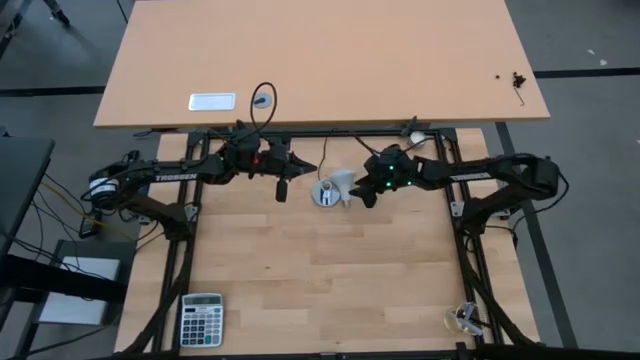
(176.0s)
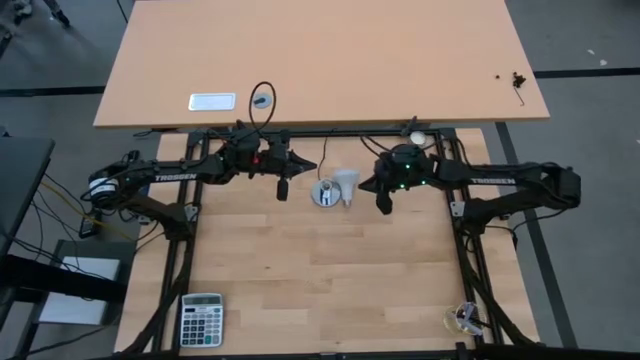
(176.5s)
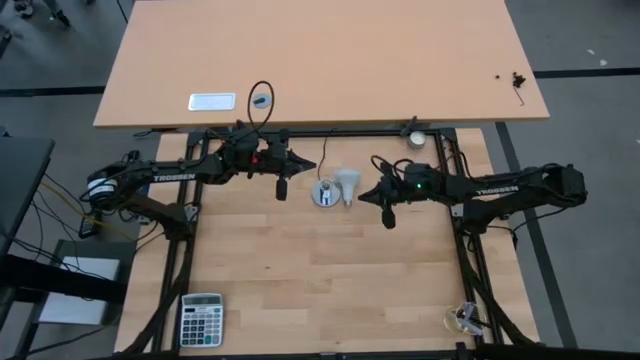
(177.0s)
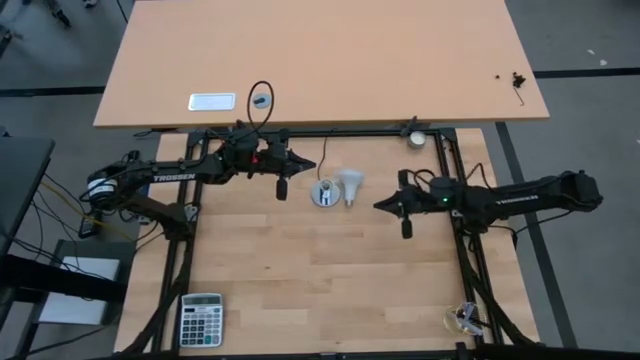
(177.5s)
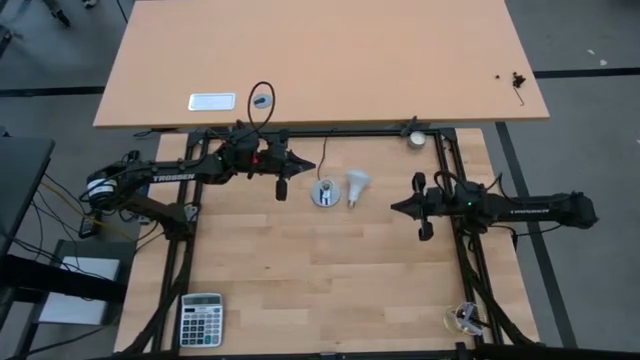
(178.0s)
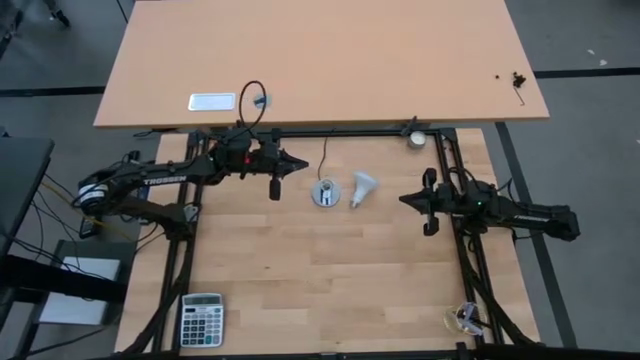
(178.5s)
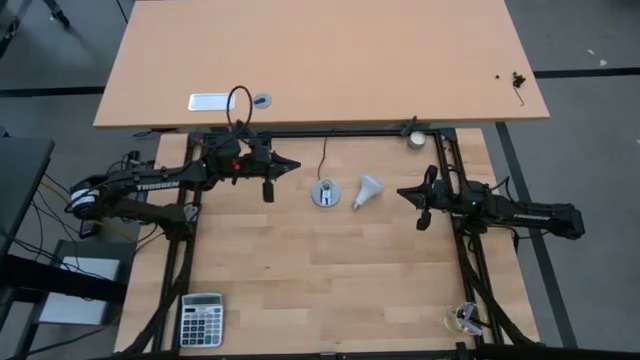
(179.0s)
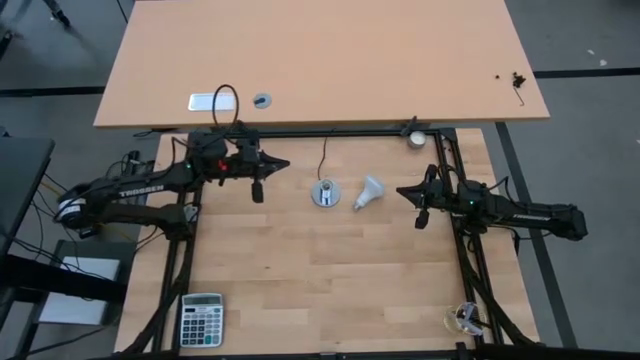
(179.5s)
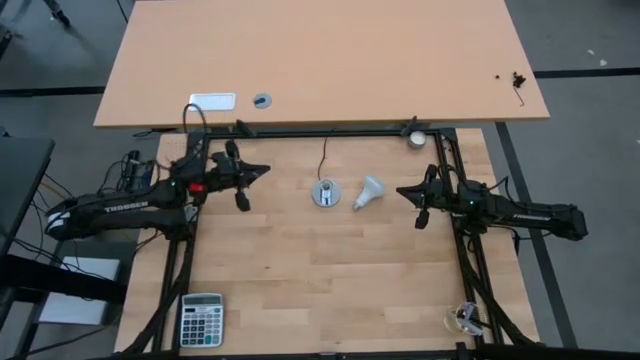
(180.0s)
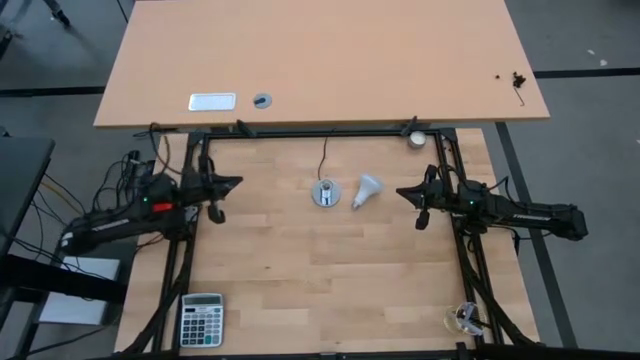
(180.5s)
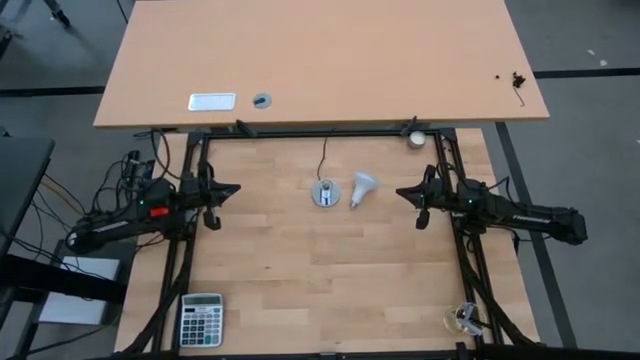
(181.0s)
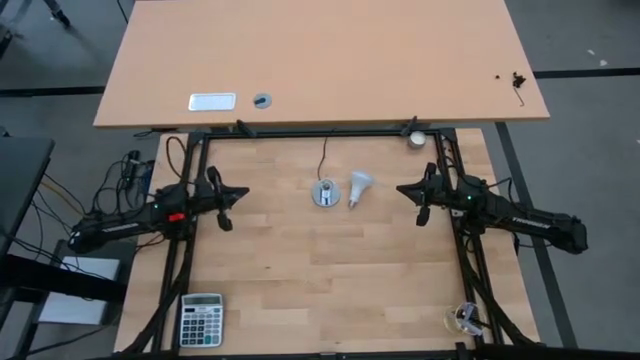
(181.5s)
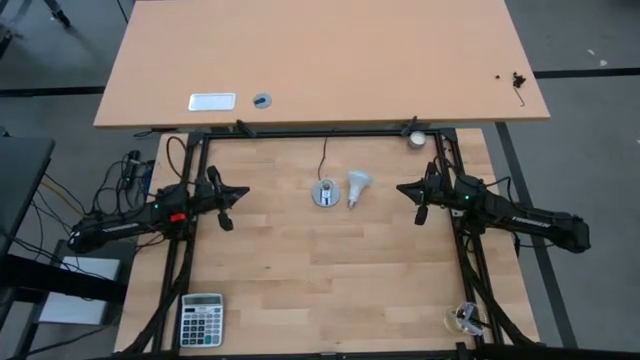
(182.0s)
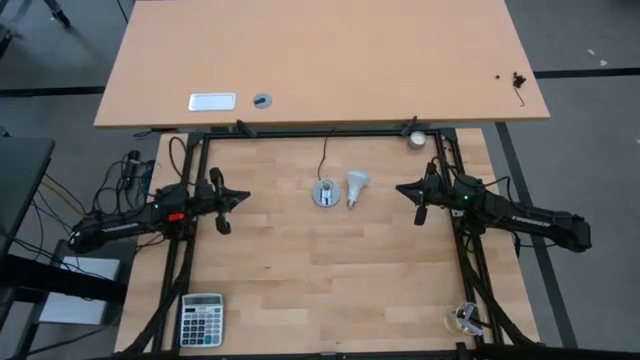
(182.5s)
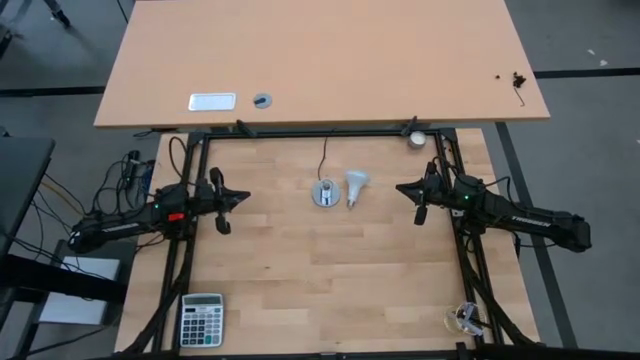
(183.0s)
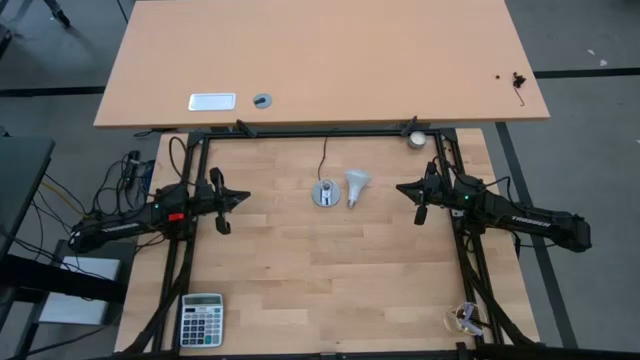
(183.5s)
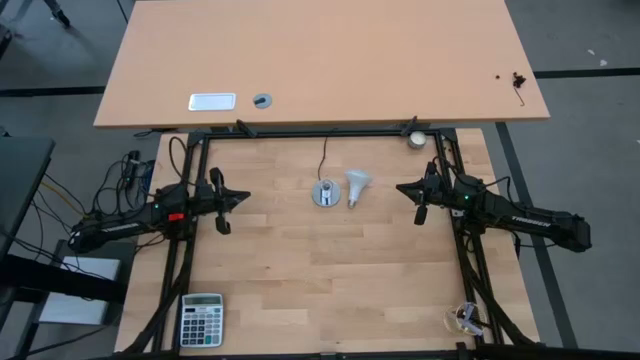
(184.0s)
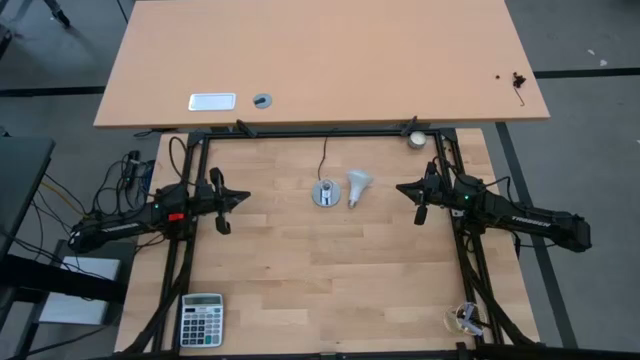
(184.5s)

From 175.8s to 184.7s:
Task: Screw lightbulb
Return to Home Position

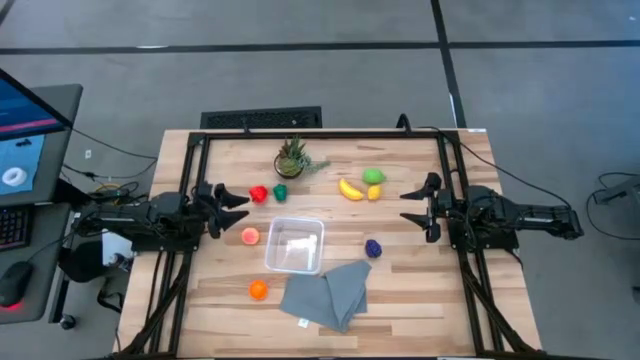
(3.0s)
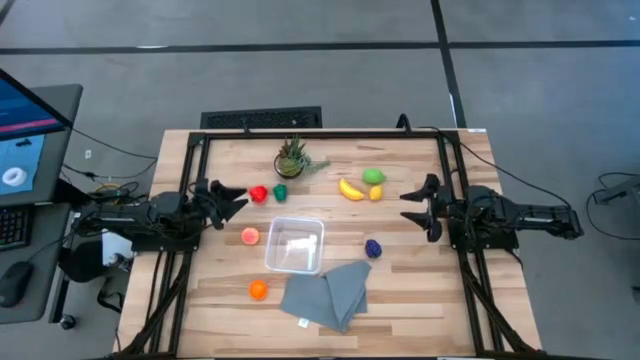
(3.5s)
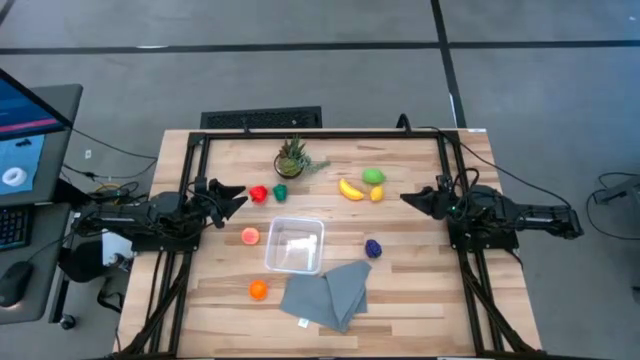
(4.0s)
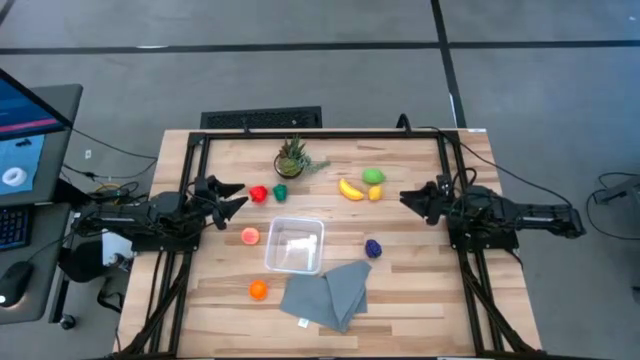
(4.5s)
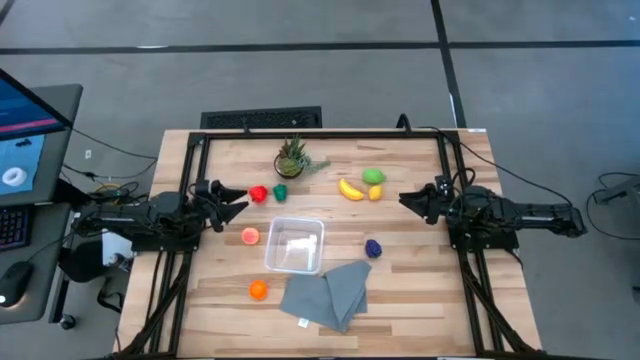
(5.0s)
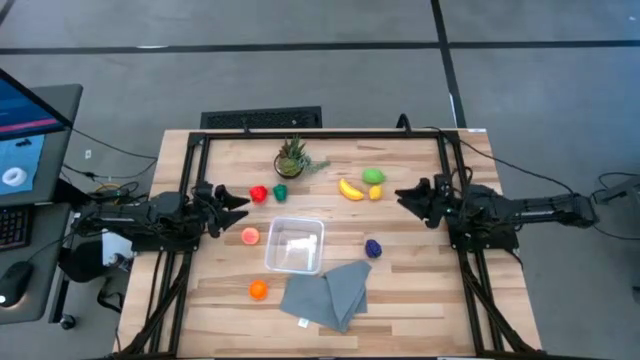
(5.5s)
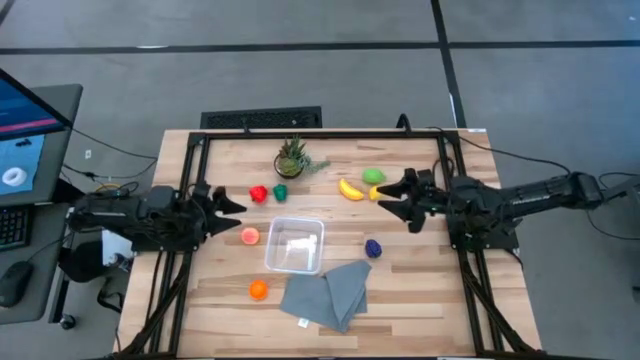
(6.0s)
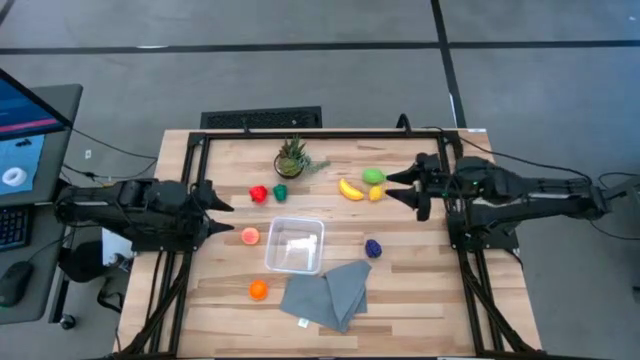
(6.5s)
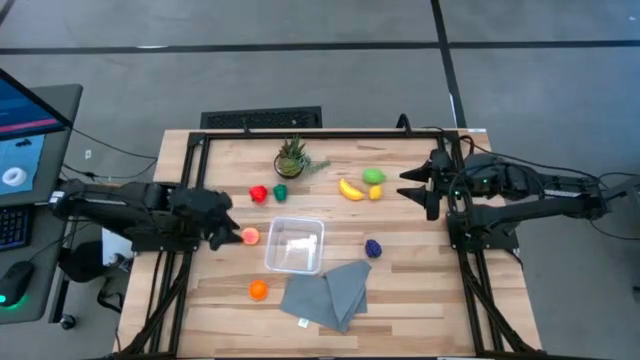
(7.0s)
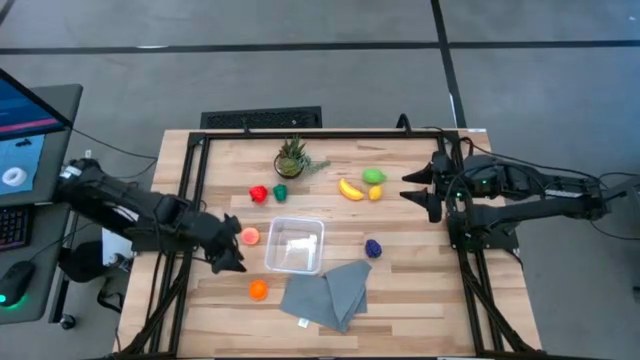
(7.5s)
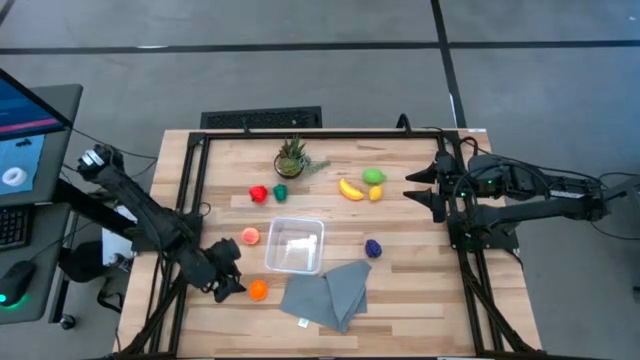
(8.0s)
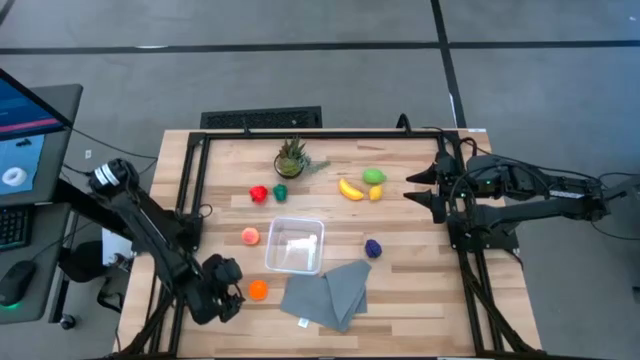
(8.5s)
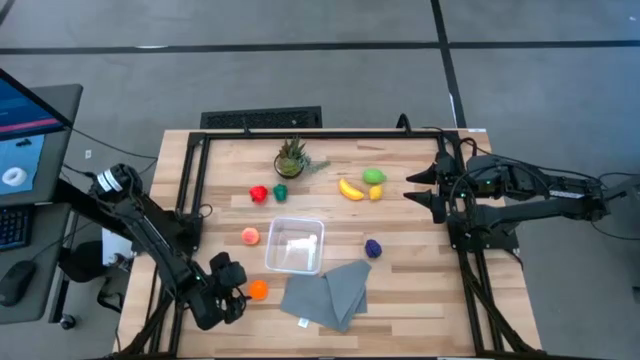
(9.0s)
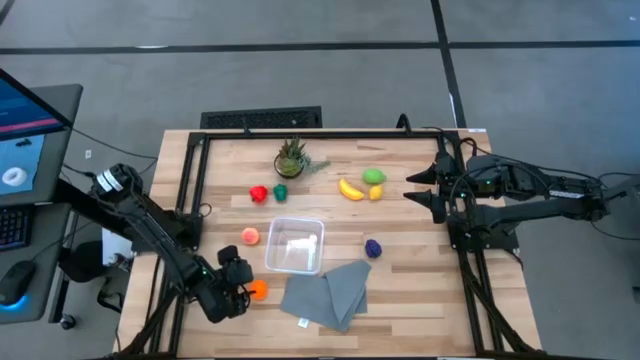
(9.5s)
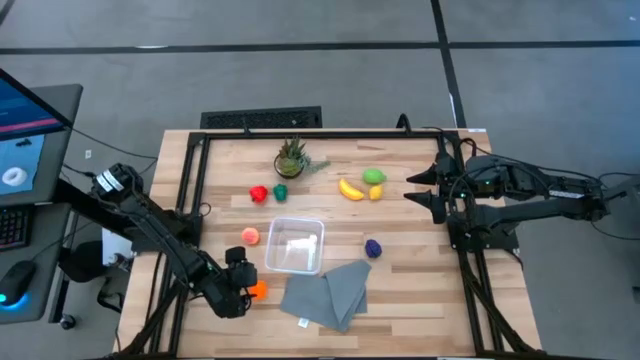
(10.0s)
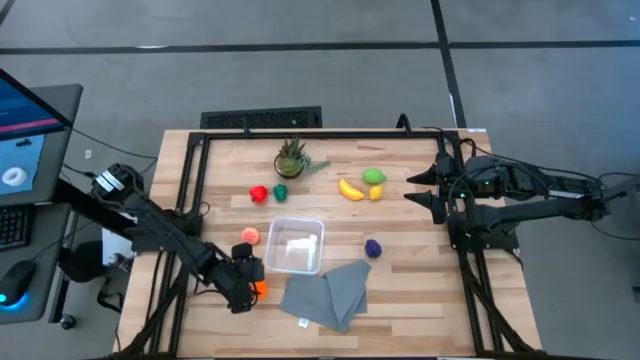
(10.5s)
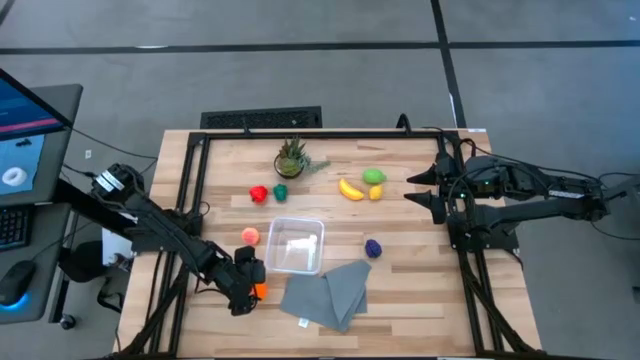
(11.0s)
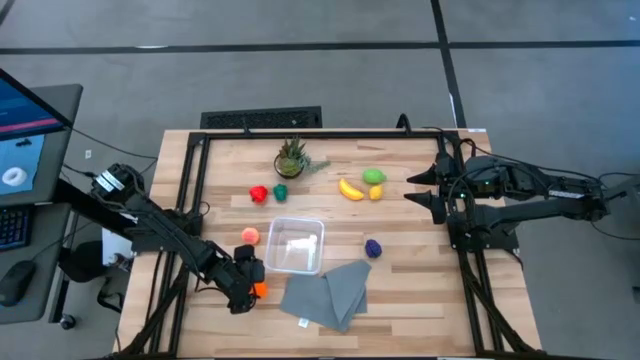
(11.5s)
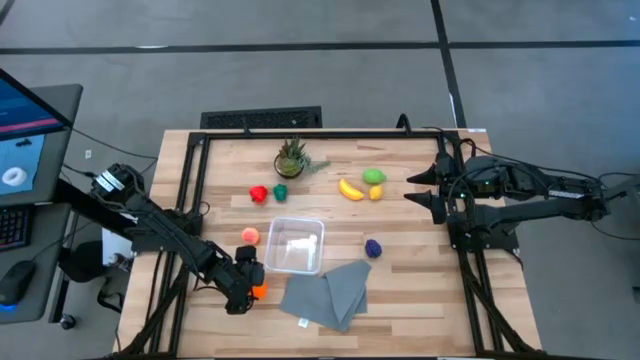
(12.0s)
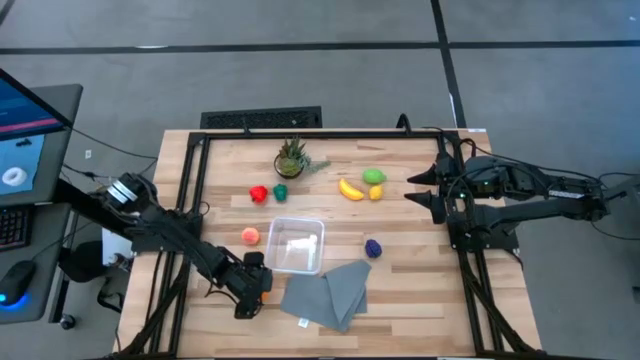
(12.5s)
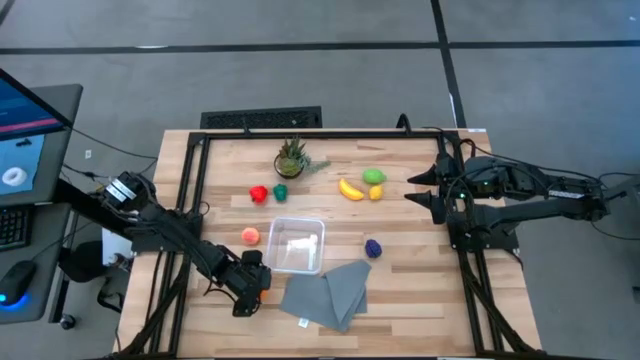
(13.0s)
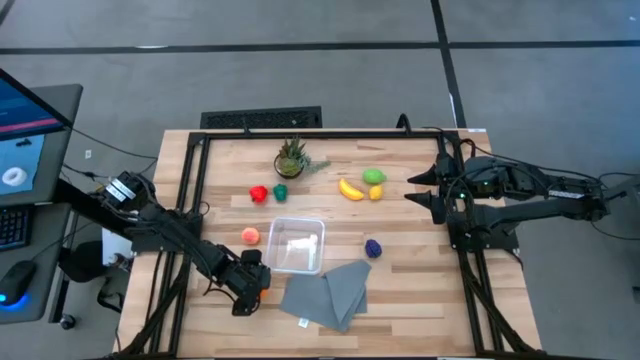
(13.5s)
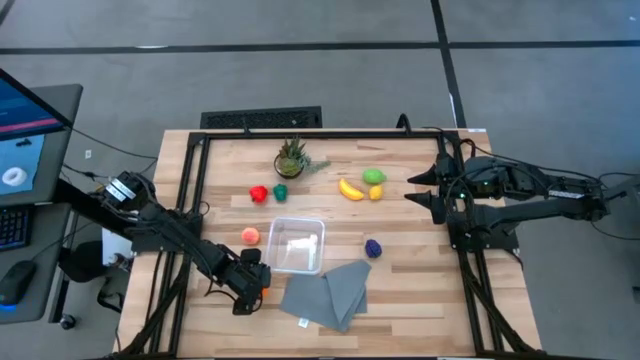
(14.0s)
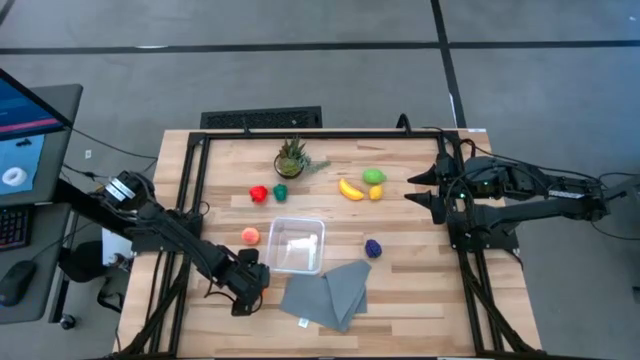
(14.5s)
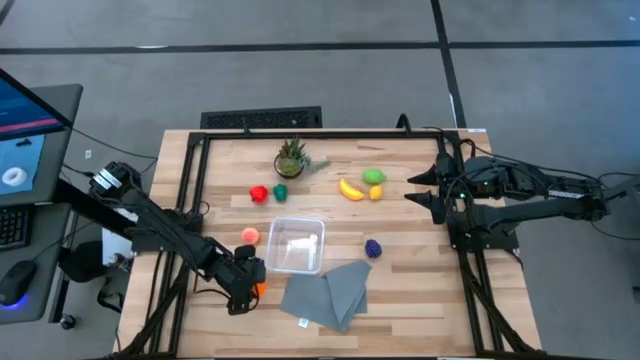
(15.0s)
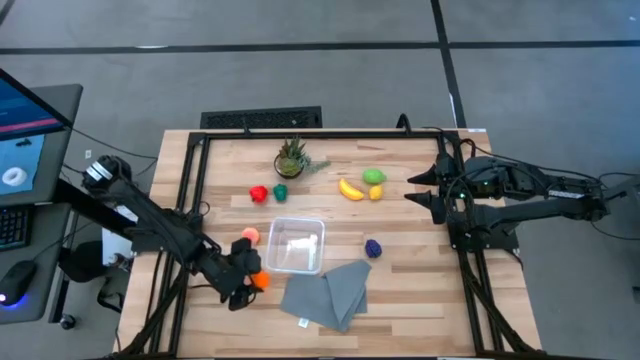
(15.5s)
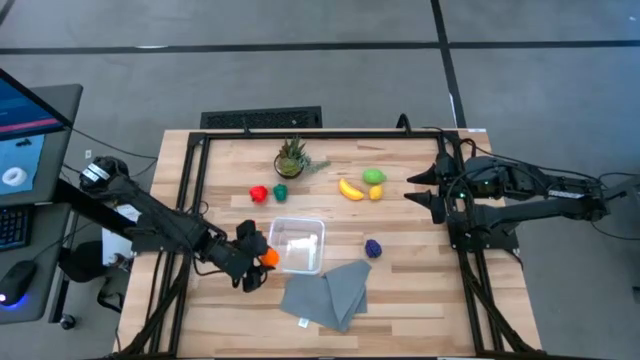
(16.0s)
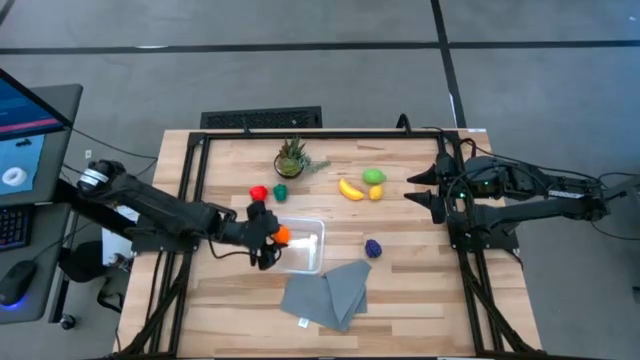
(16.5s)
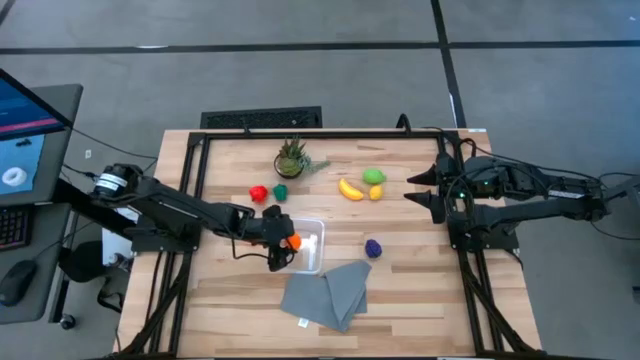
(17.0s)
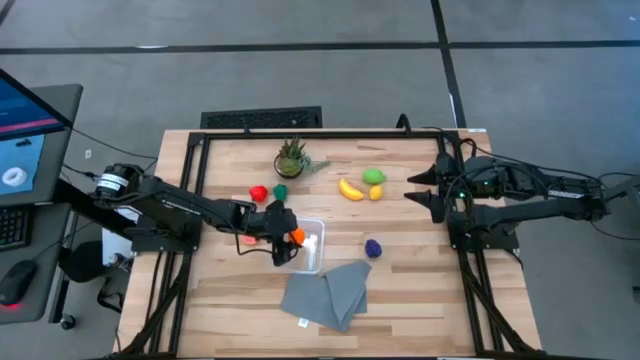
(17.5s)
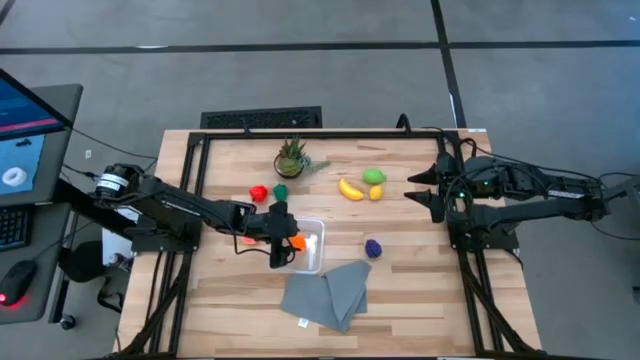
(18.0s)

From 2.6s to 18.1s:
Task: Pick and placing Produce into tupperware
Put the orange into the transparent container
